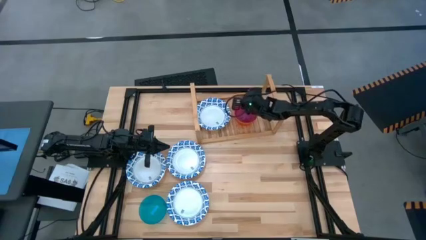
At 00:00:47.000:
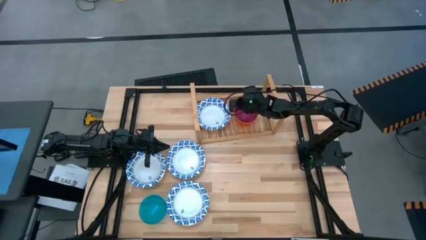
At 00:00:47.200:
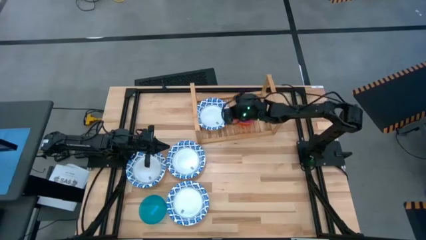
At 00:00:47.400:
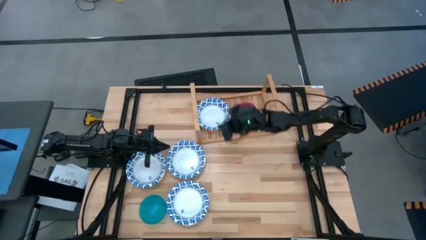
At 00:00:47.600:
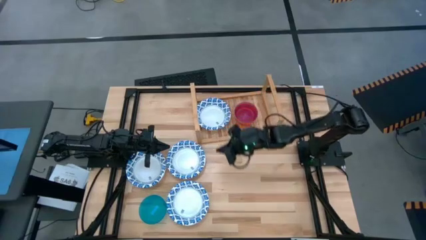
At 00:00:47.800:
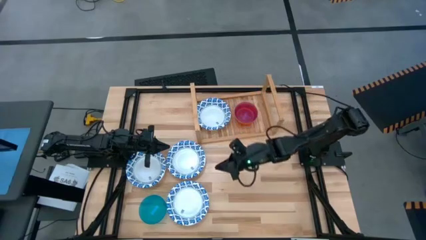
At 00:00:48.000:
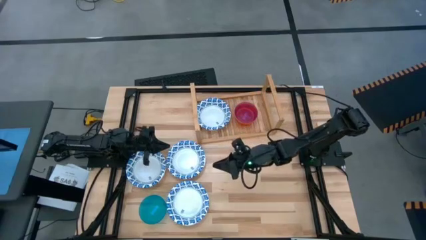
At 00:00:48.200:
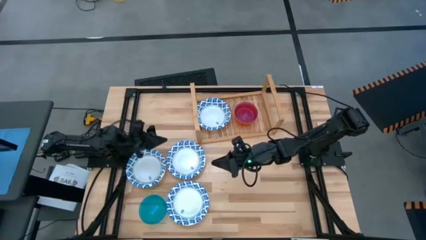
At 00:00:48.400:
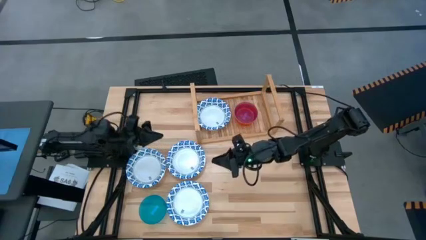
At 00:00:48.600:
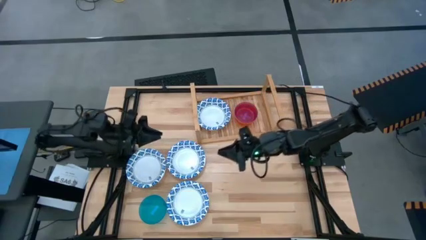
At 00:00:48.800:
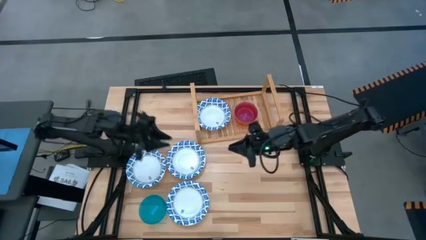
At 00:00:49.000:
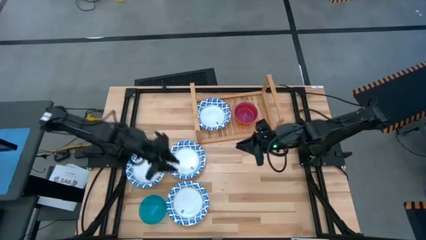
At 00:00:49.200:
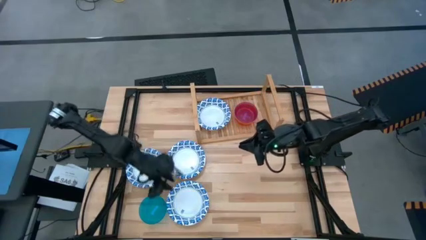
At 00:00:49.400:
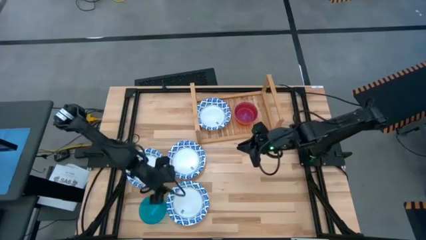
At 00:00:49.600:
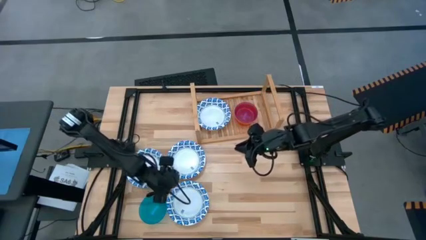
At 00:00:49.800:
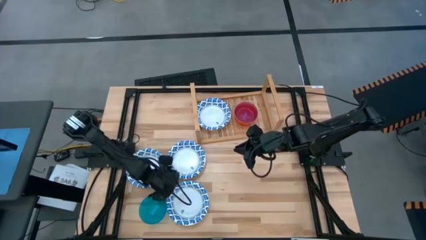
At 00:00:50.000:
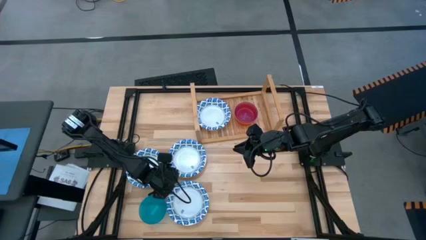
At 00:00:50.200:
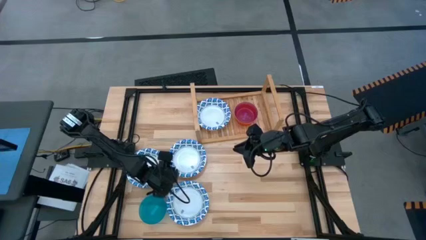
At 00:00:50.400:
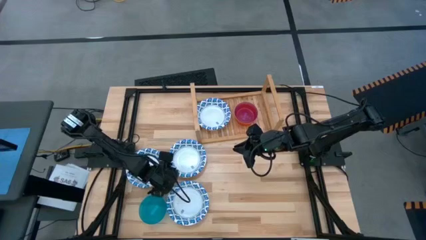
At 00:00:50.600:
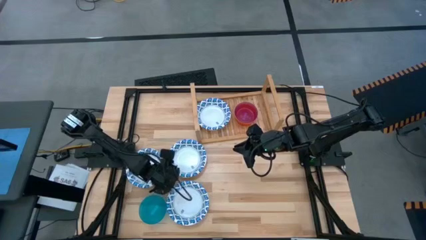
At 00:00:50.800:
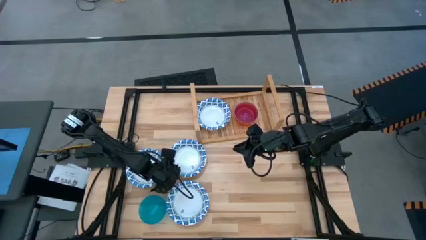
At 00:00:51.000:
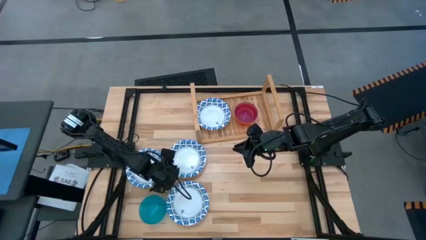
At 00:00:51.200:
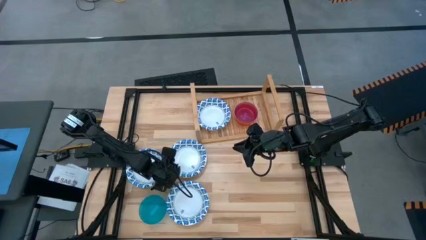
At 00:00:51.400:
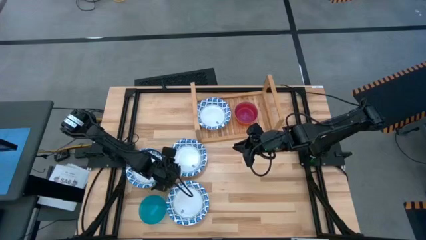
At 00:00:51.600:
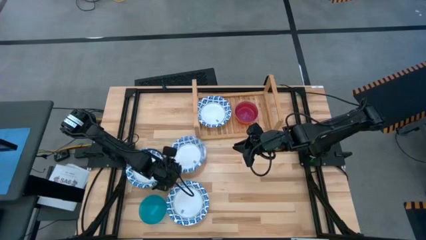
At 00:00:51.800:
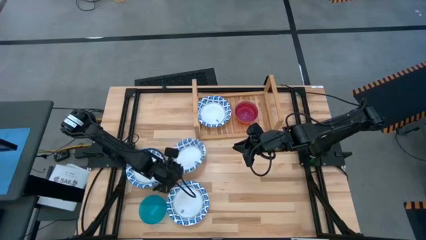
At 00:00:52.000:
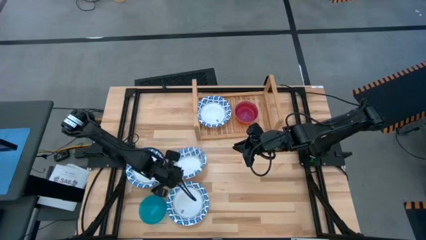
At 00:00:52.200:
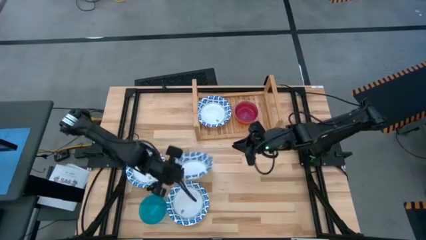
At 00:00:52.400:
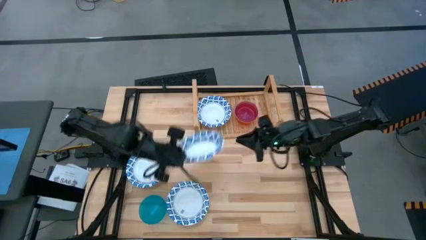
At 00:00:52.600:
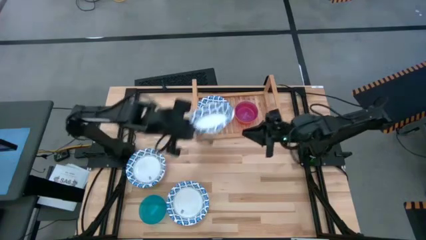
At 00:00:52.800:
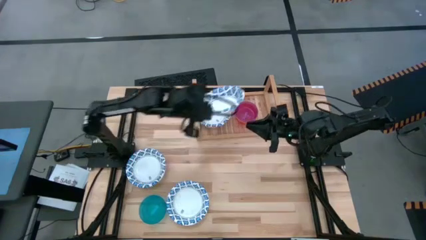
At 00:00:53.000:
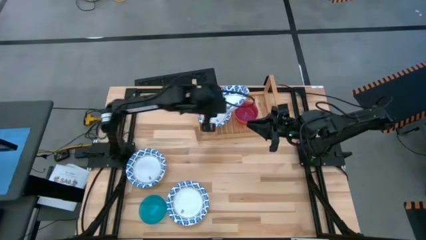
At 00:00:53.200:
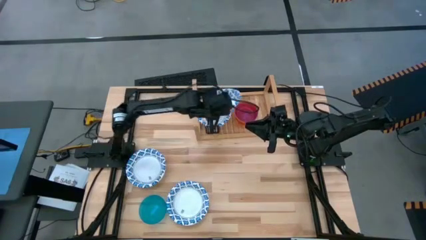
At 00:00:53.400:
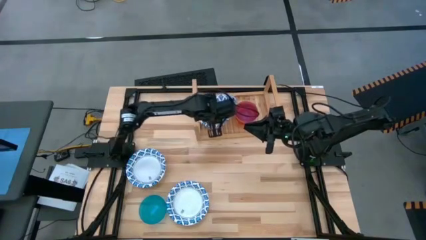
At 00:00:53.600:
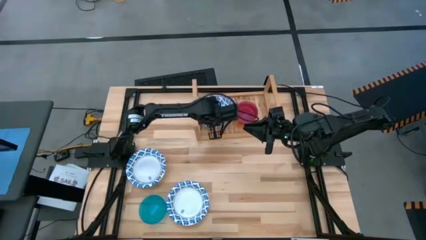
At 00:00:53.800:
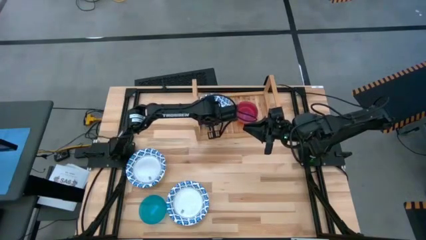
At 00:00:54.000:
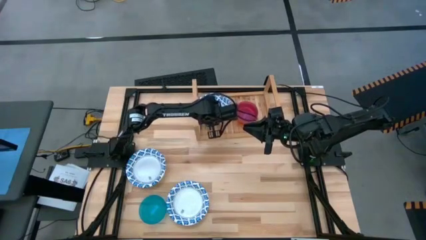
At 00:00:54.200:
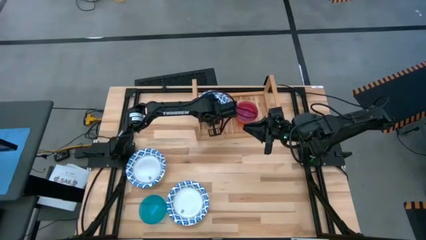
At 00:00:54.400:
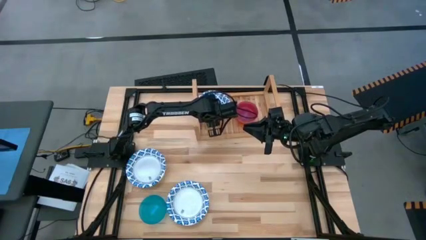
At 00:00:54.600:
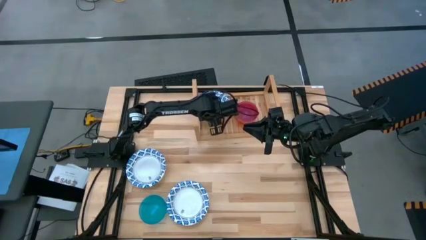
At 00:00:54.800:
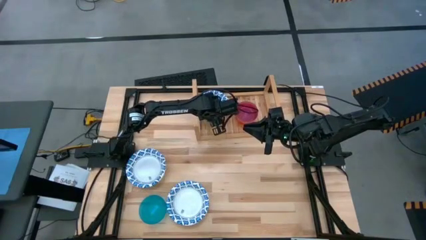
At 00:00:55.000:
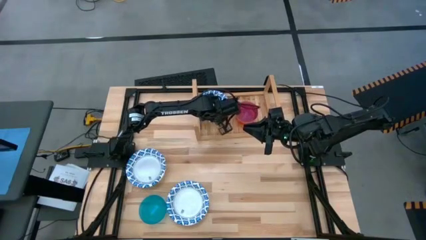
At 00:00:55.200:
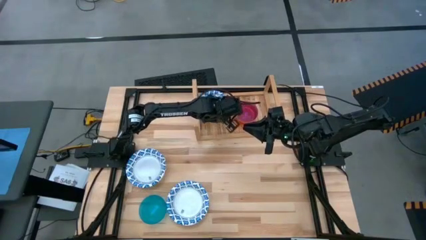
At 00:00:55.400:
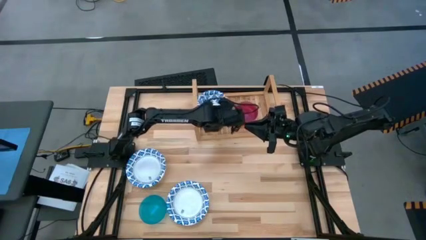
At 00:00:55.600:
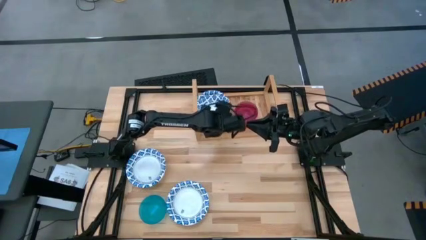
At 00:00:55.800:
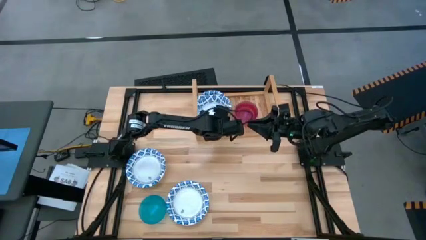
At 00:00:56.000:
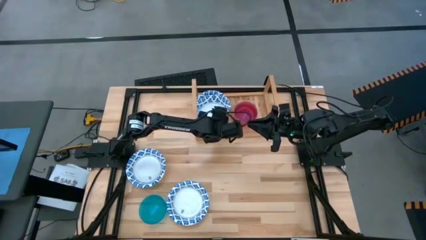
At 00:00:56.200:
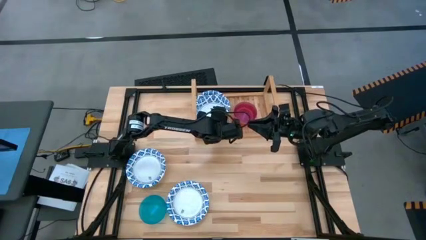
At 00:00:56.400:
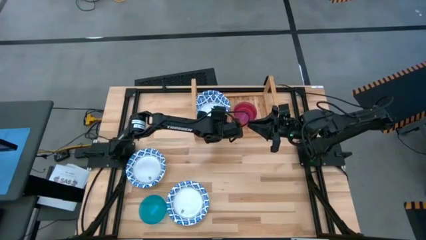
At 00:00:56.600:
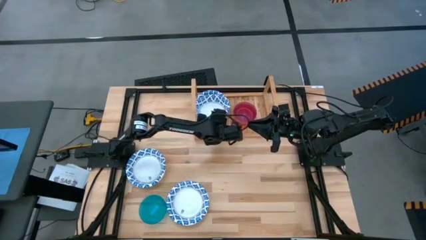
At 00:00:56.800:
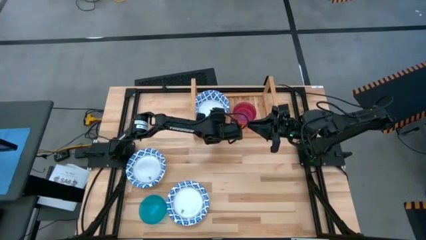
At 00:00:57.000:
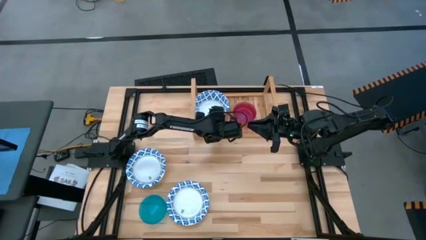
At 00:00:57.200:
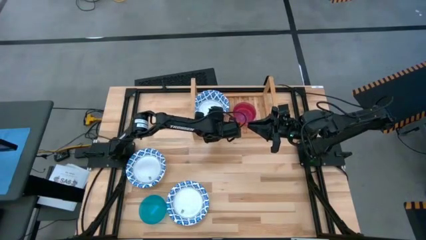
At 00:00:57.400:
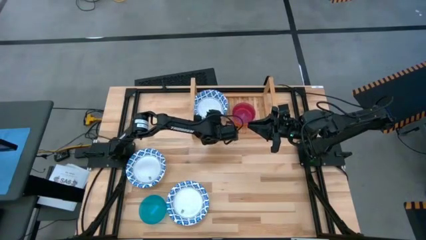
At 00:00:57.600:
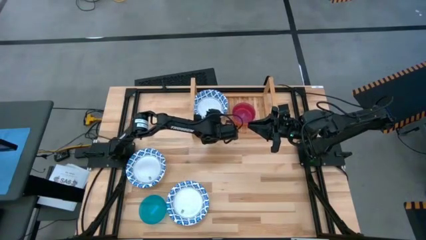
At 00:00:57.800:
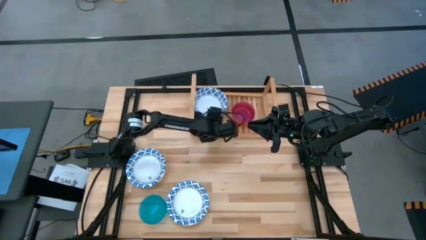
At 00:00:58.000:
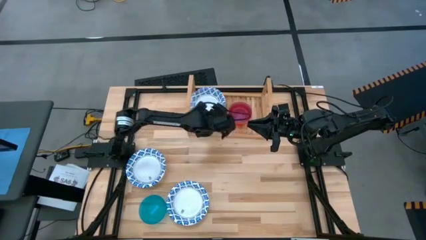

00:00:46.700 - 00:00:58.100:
Task: Place and stack bowls onto a shelf
Stack the top right blue pattern bowl on top of the other blue pattern bowl on the shelf

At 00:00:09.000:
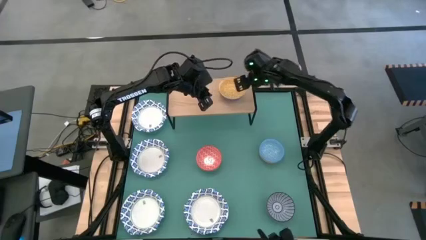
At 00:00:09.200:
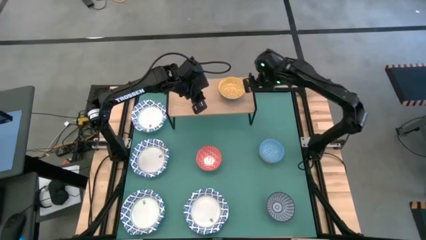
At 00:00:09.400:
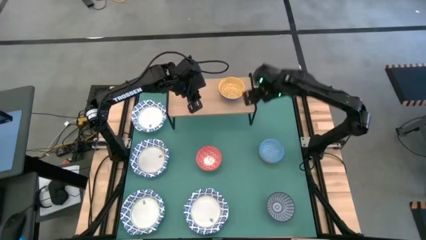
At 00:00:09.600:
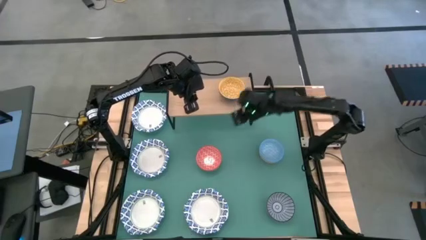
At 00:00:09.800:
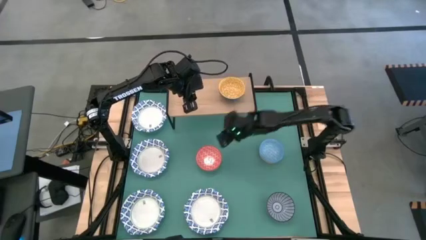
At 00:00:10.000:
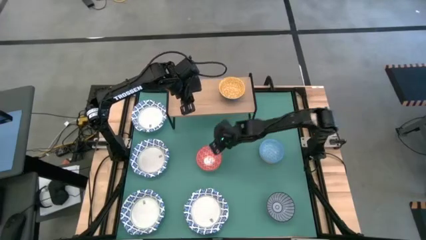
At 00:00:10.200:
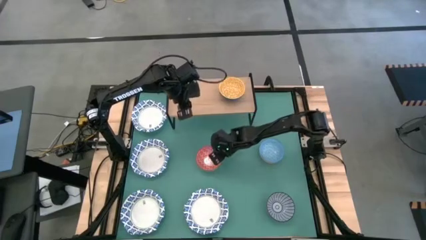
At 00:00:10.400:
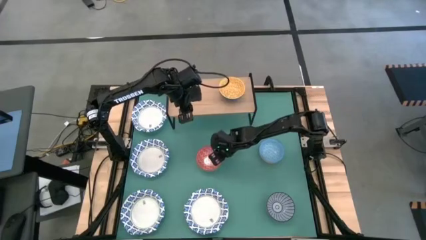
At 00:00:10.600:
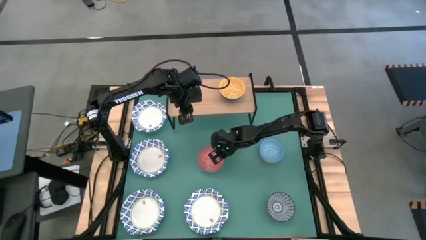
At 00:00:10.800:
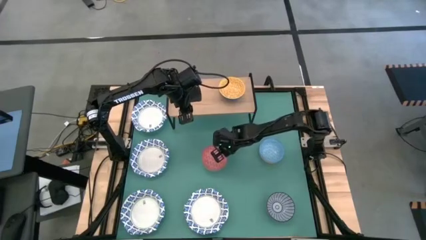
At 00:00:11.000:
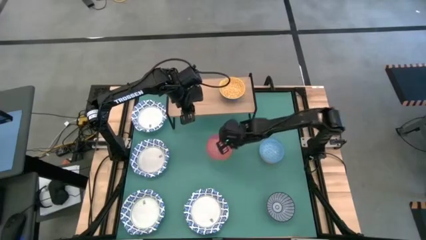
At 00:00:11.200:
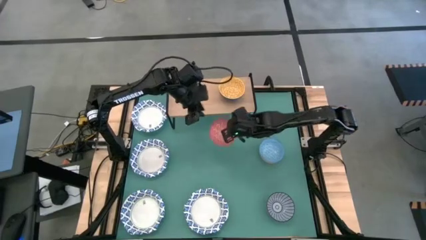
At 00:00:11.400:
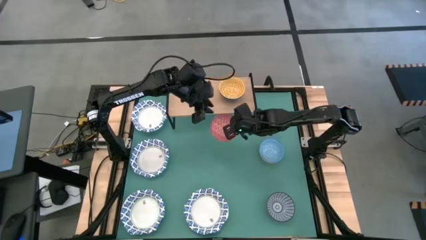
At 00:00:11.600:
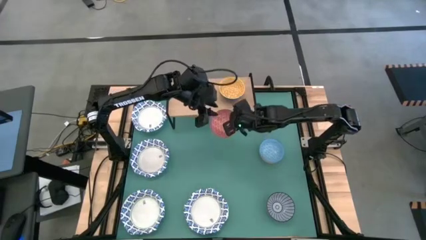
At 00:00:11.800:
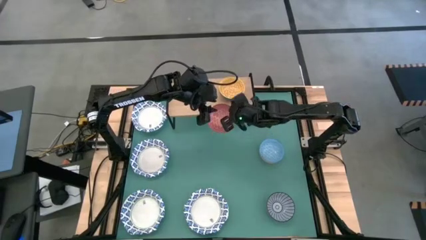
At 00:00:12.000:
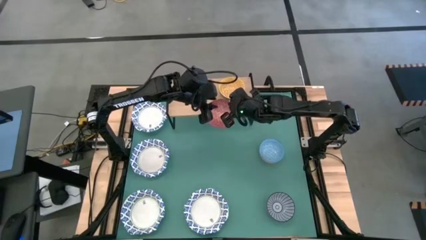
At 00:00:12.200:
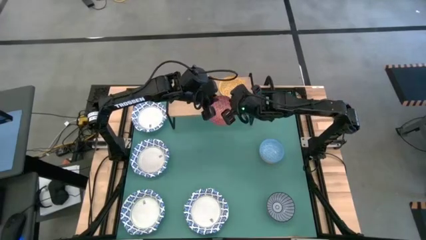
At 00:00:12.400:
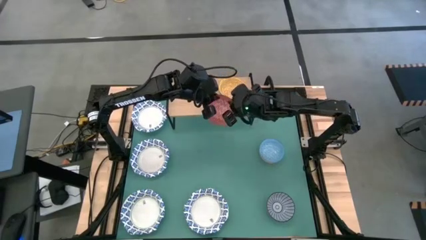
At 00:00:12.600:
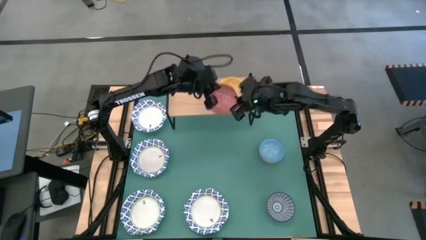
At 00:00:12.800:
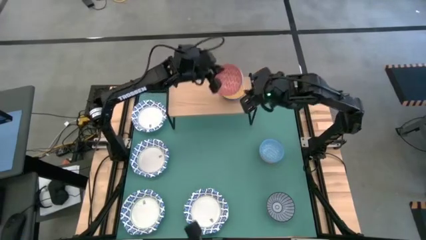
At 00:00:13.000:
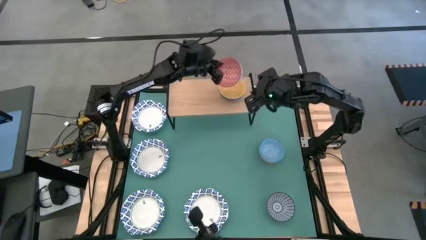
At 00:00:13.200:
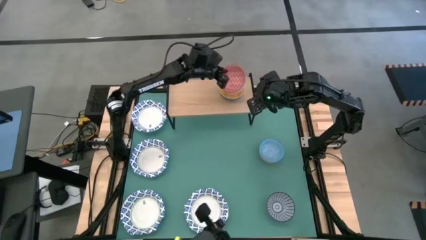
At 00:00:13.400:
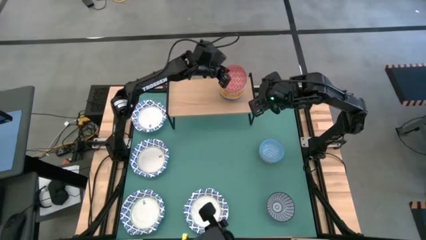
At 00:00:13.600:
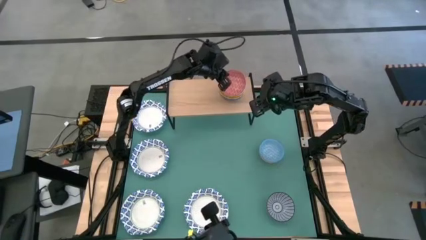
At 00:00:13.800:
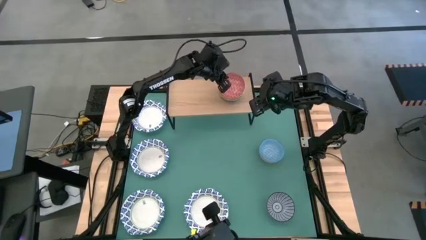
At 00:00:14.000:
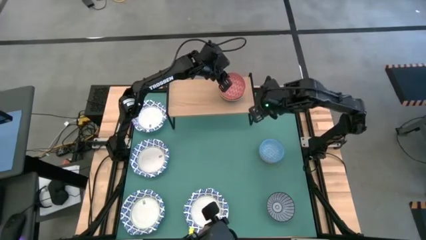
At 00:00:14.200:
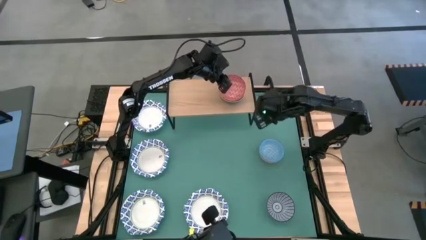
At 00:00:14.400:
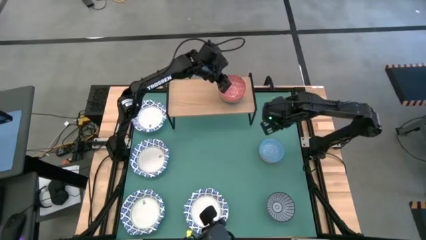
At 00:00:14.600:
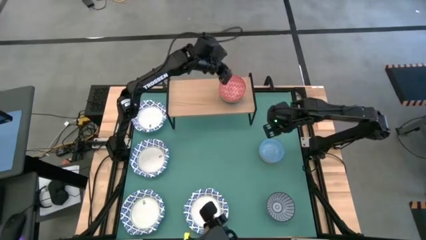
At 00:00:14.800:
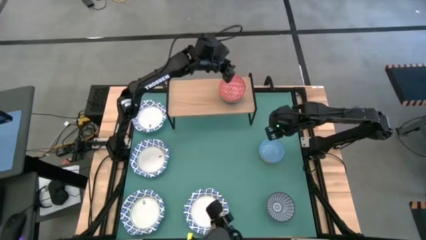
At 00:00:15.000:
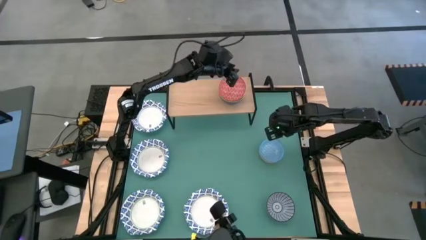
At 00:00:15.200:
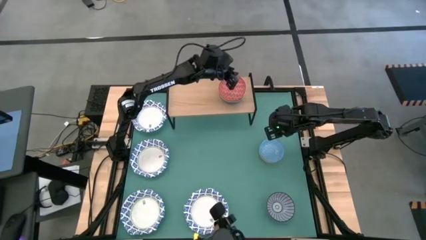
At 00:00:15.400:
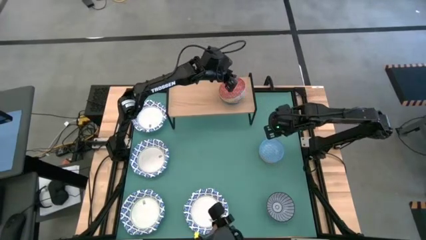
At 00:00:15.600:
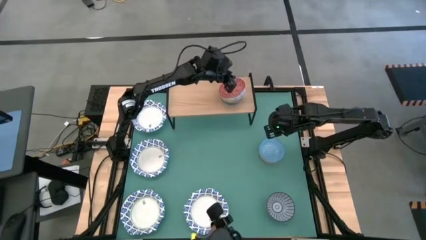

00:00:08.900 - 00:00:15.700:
Task: Place and stack bowls onto a shelf
Stack the small red bowl on the small yellow bowl on the shelf
